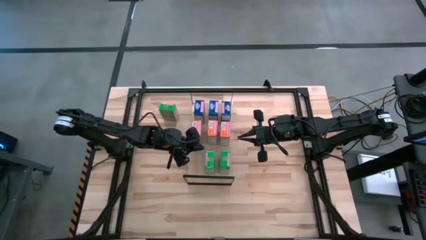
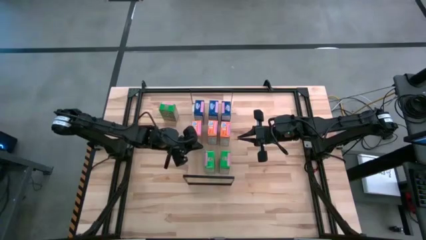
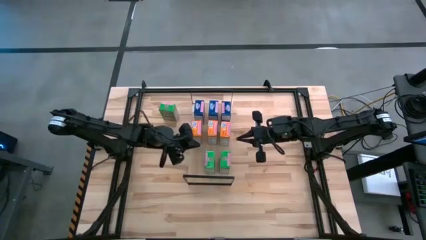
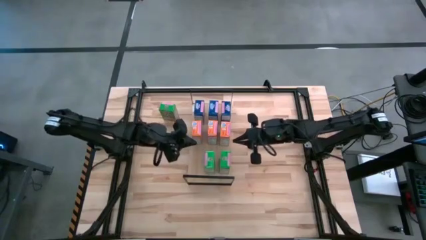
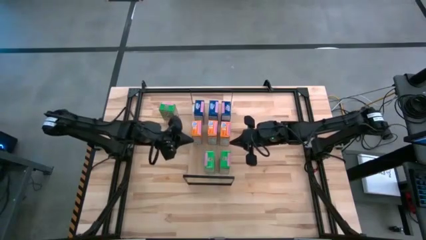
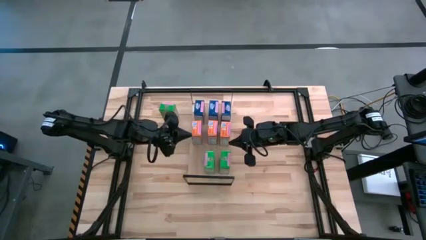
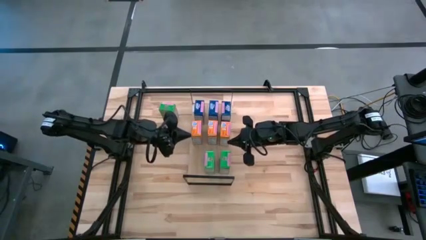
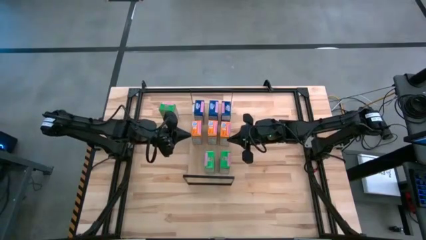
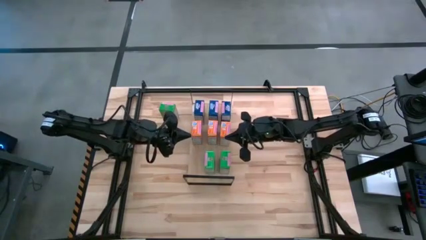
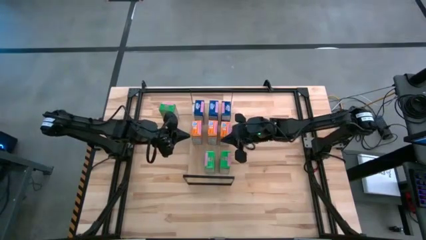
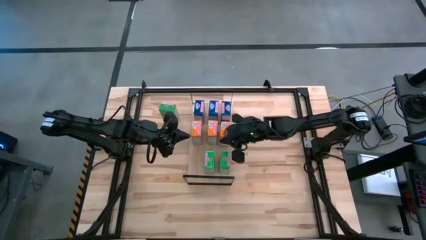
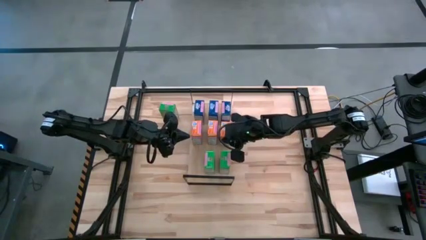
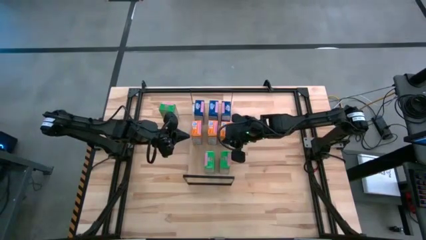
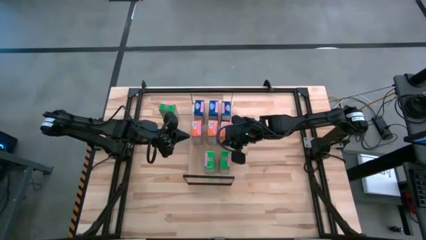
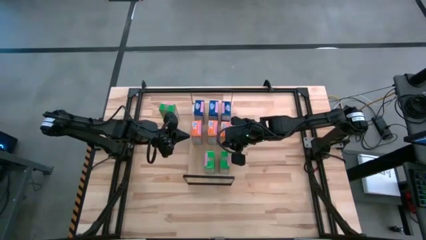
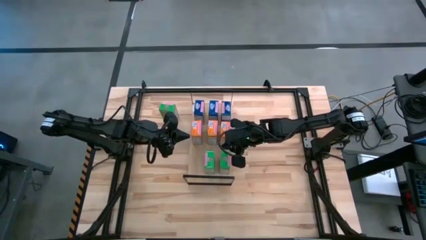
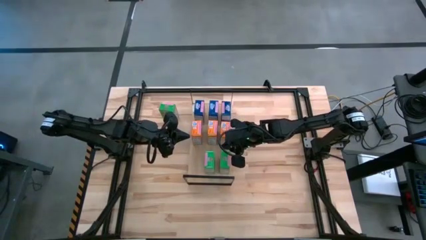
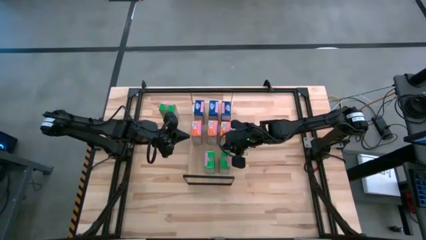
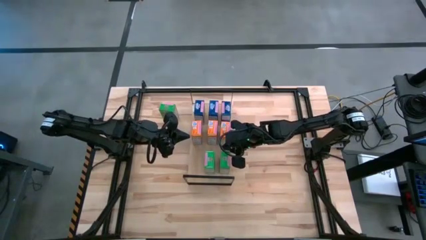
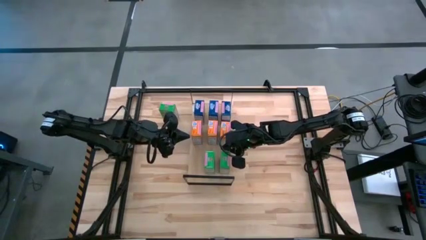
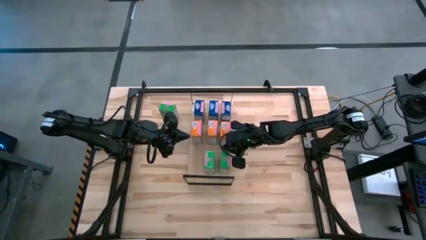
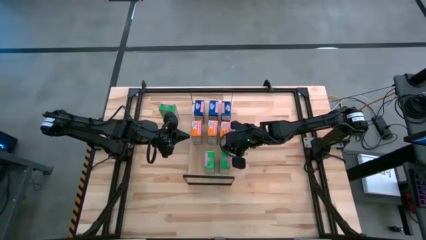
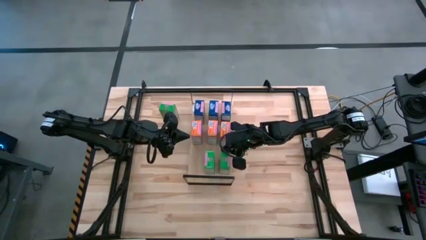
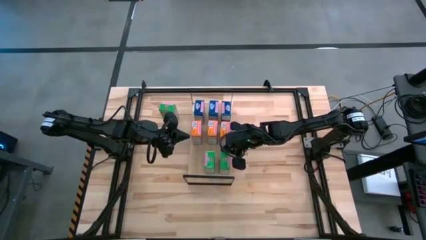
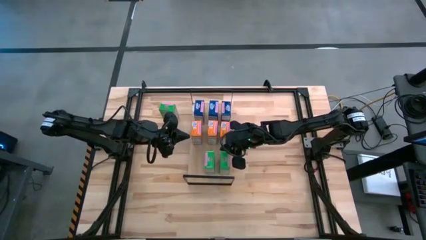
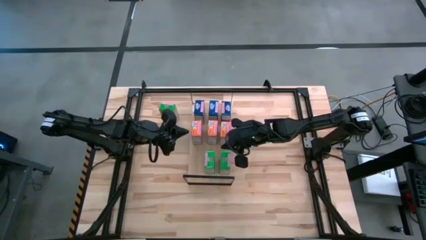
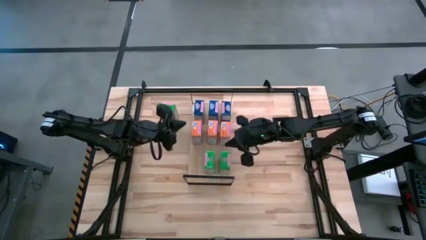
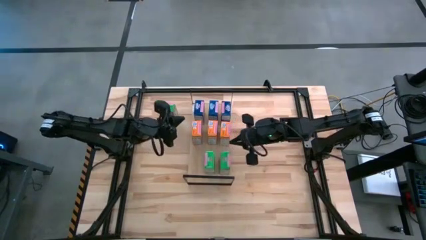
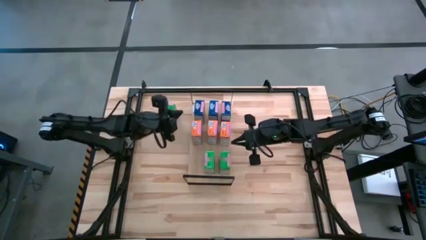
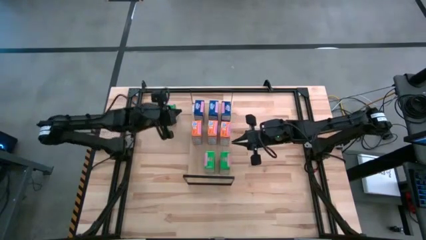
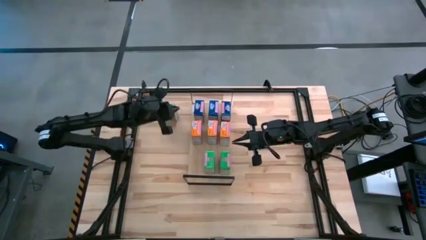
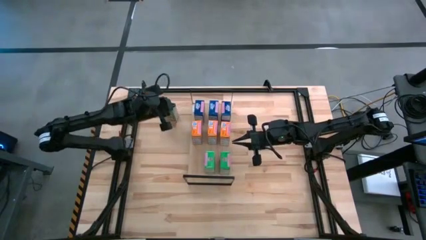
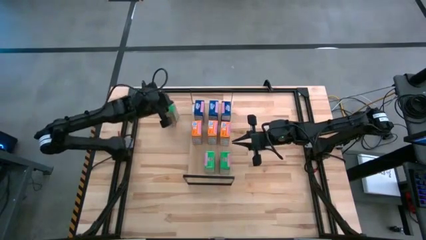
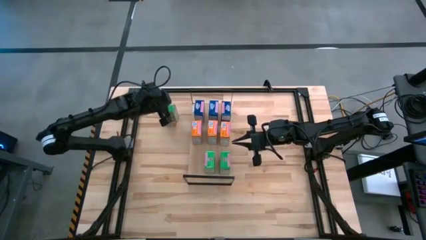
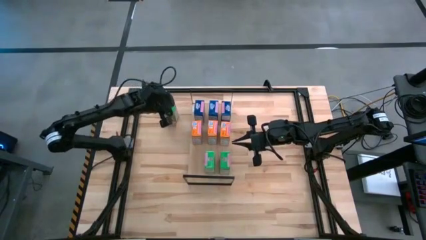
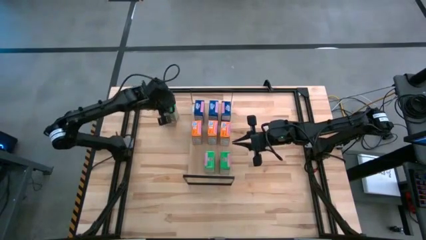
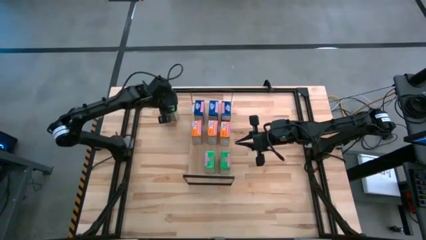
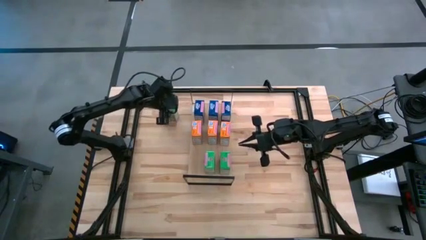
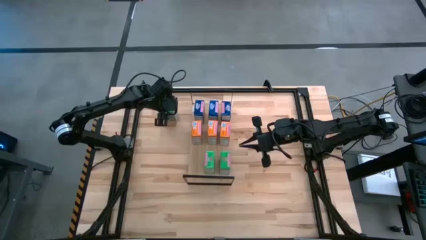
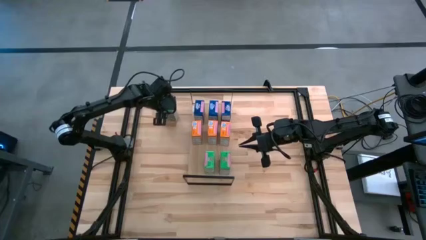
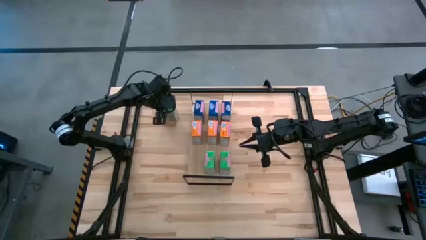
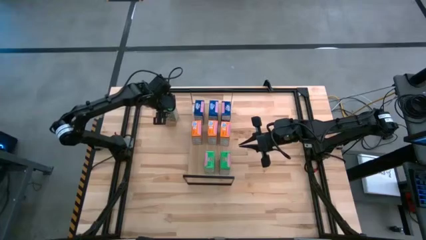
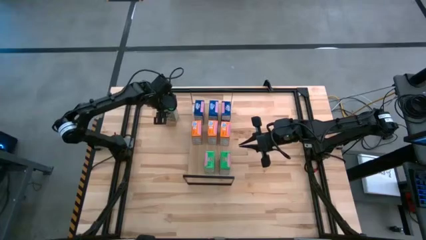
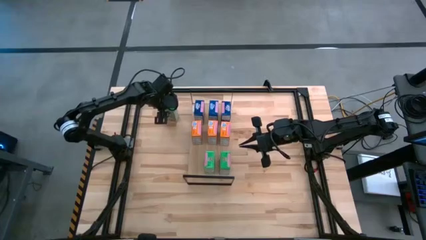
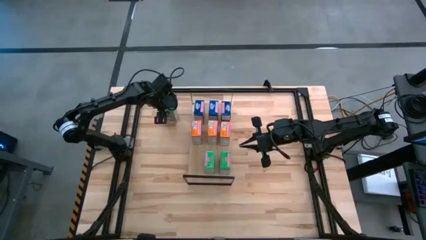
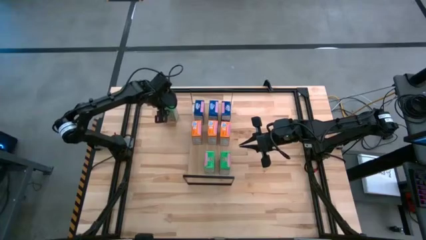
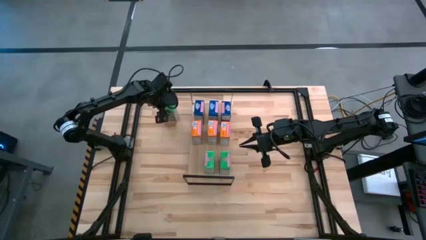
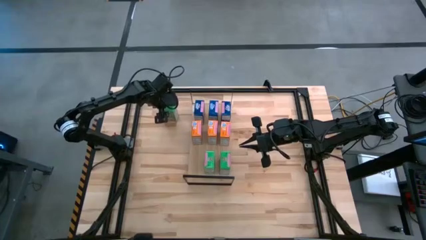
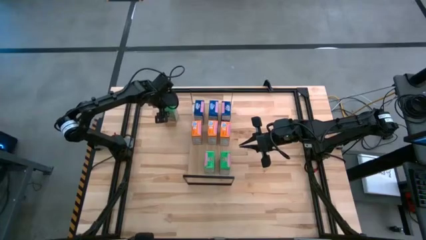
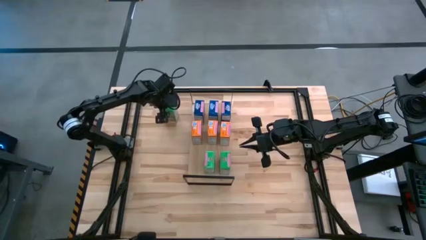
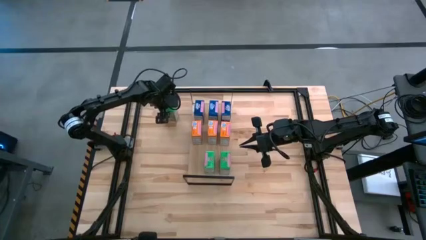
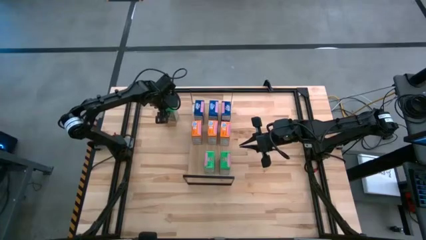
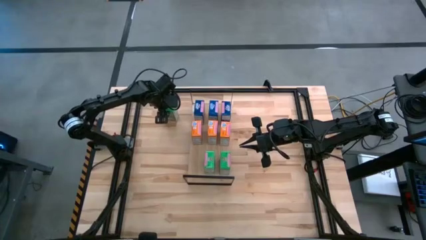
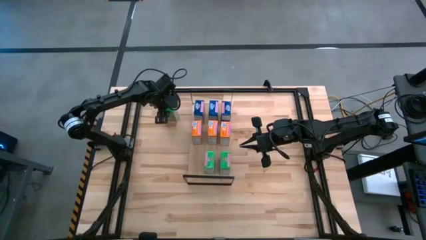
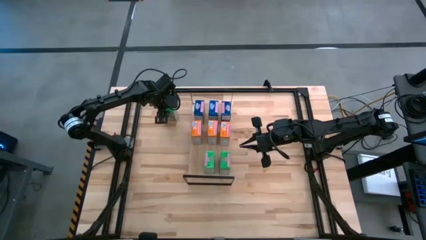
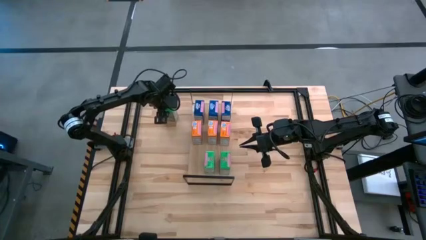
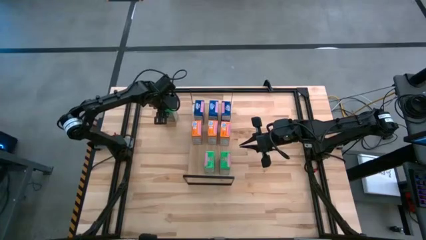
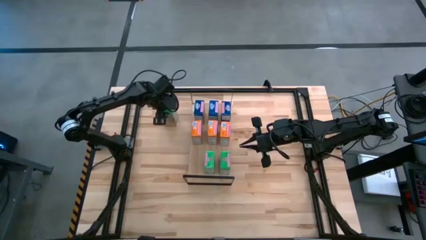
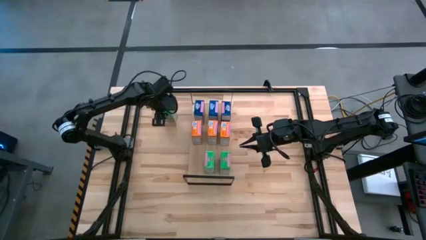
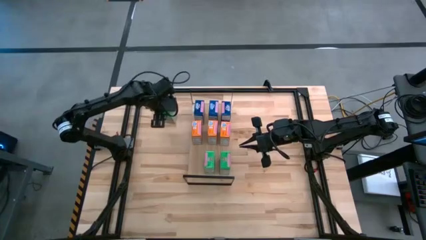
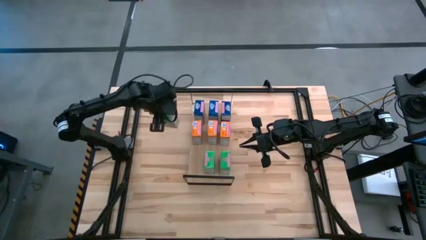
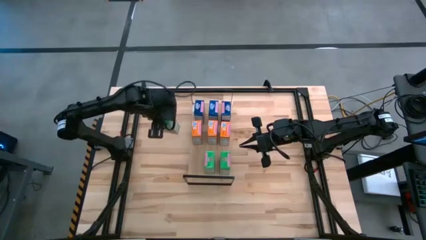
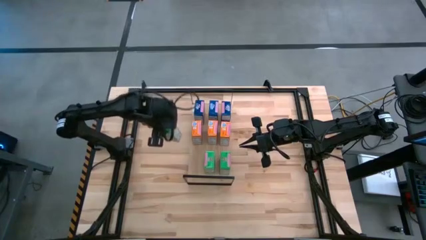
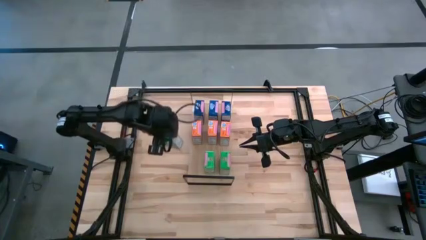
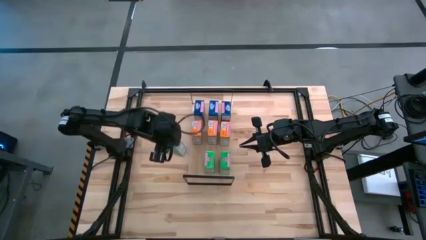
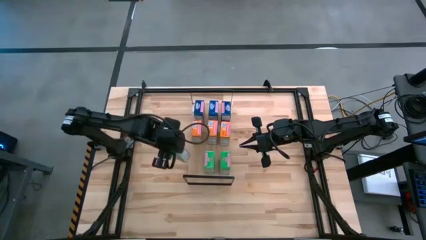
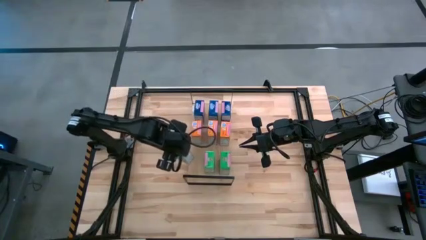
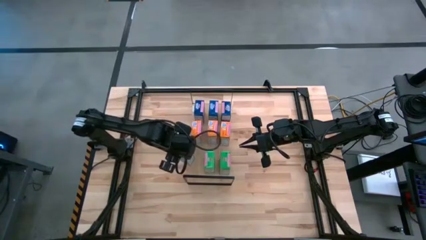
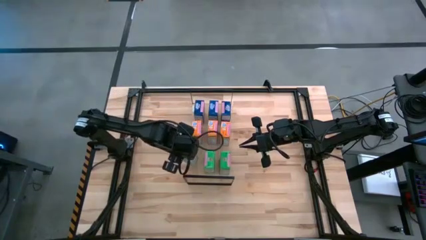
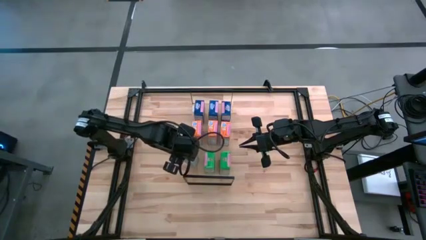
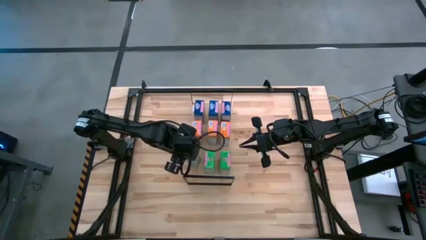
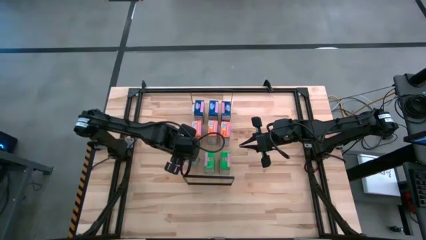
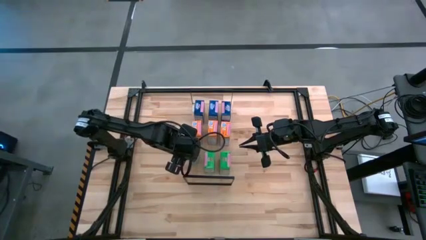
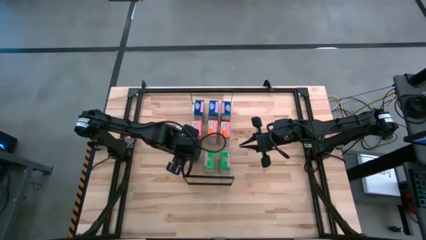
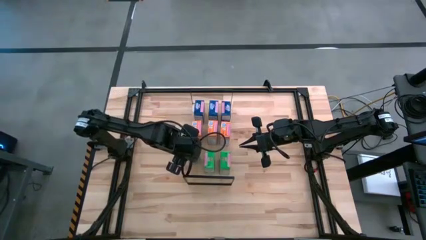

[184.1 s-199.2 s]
Task: Stack cereal on shelf
Put the green cereal box on the shelf aligned with the other green cereal boxes

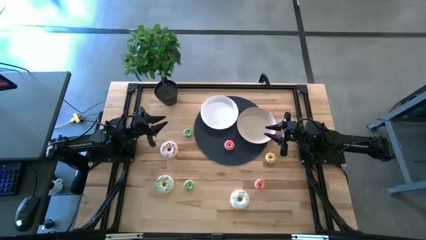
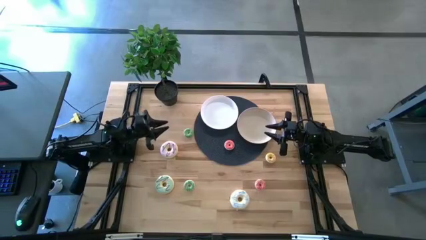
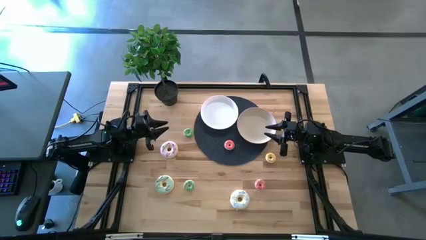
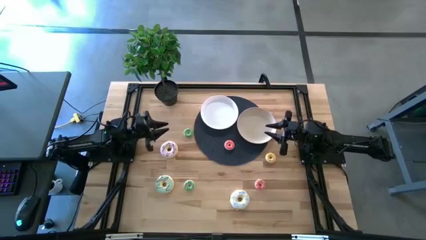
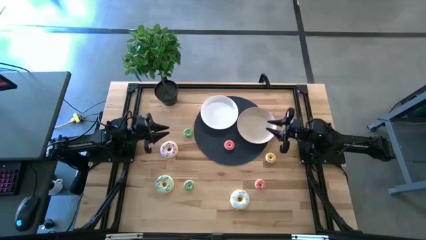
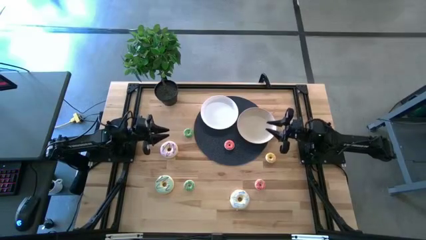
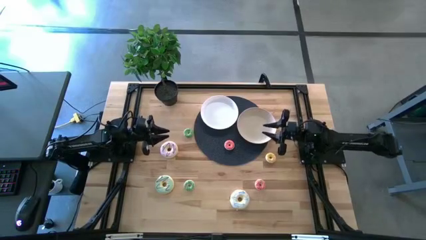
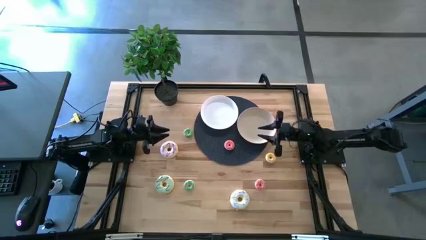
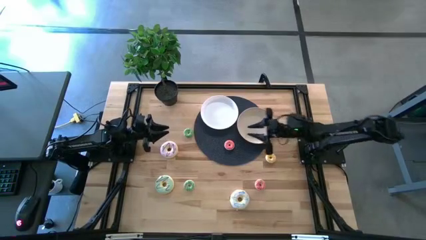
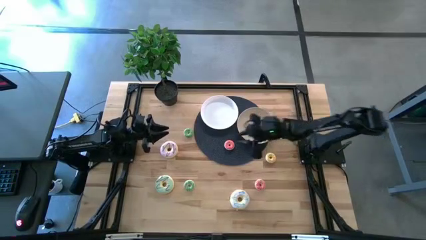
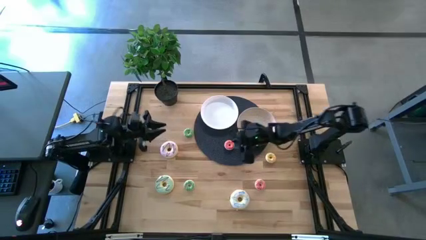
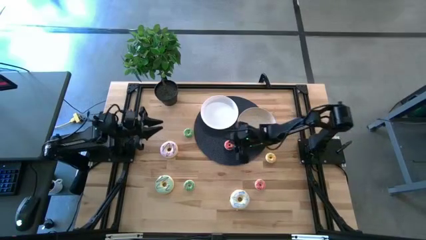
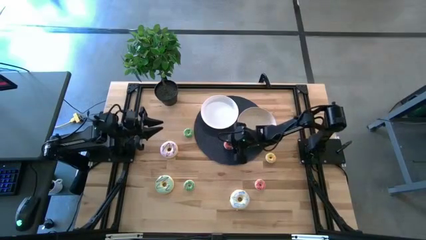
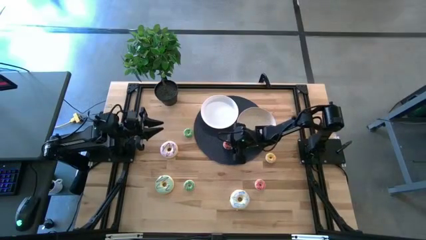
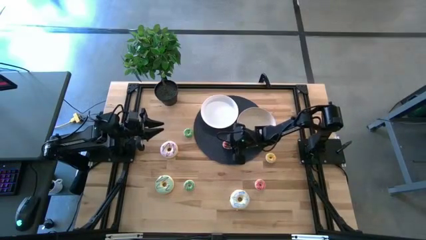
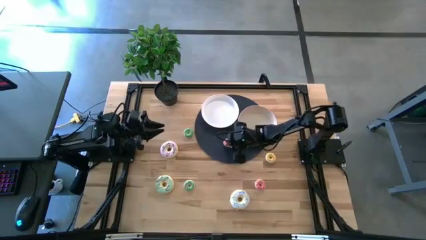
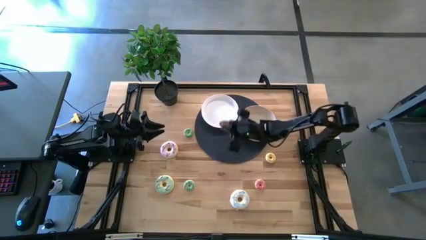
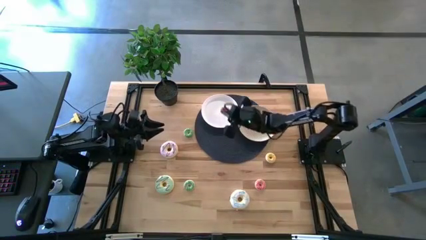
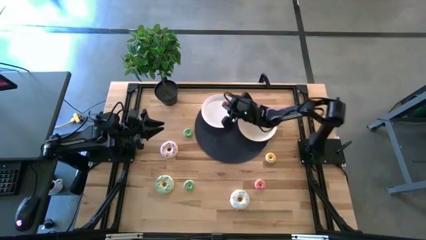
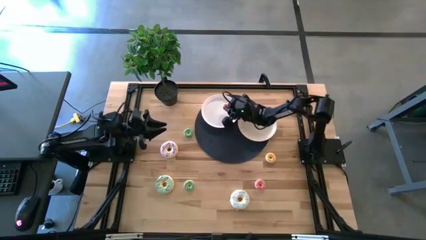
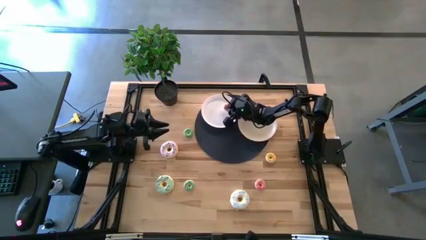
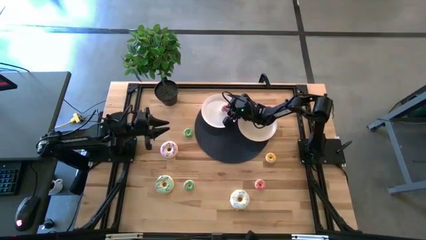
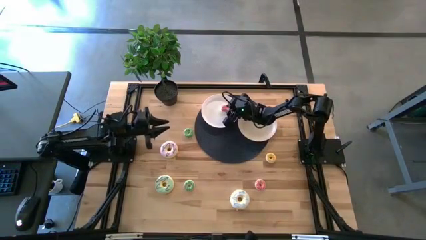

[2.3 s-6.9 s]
Task: Pick & Place donuts
Put the top small pink donut on the white plate
